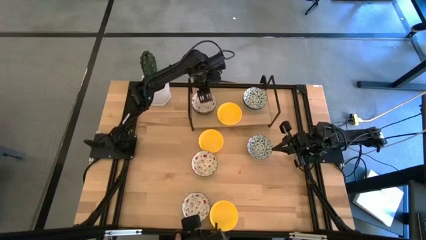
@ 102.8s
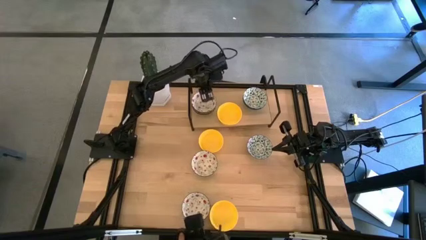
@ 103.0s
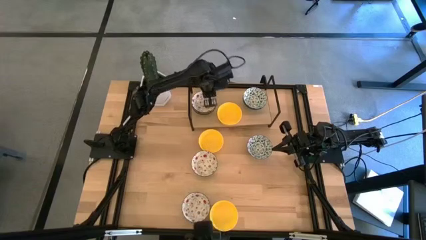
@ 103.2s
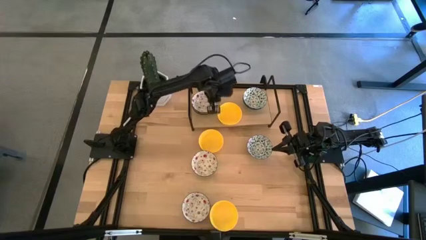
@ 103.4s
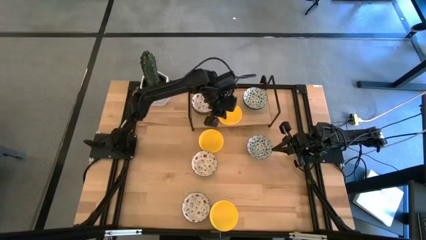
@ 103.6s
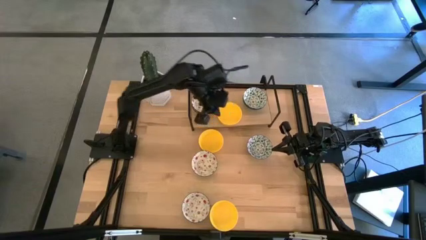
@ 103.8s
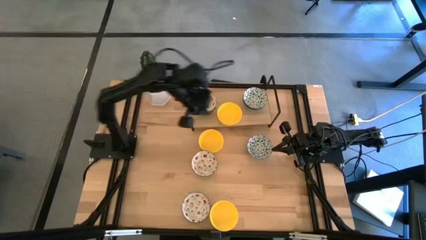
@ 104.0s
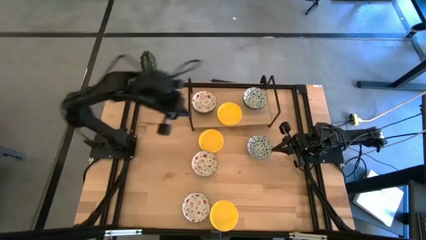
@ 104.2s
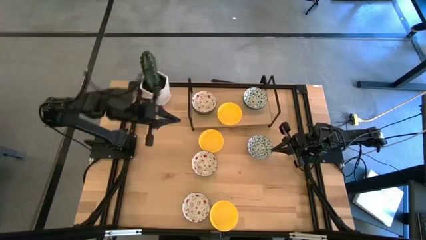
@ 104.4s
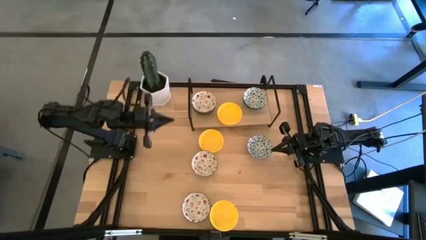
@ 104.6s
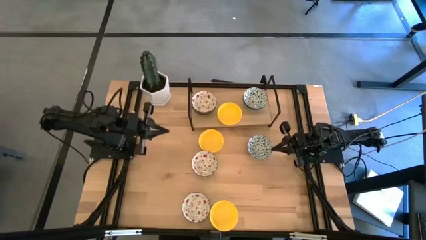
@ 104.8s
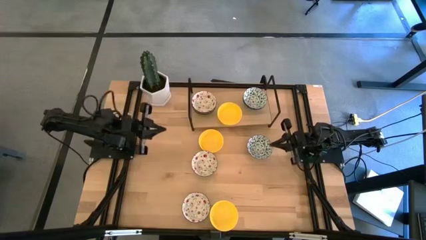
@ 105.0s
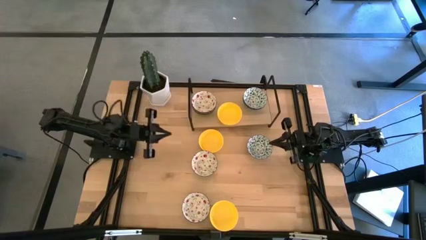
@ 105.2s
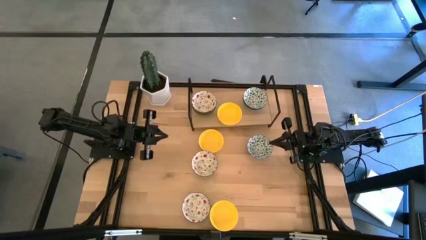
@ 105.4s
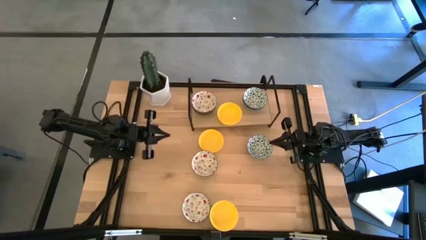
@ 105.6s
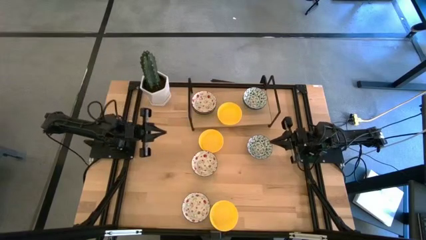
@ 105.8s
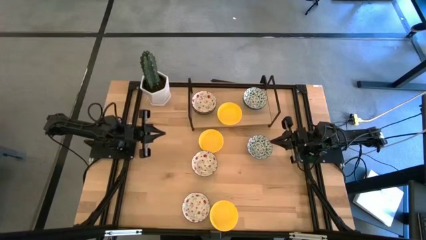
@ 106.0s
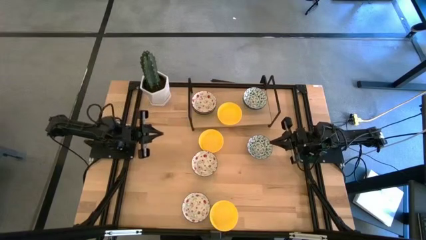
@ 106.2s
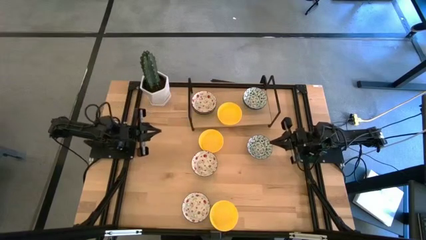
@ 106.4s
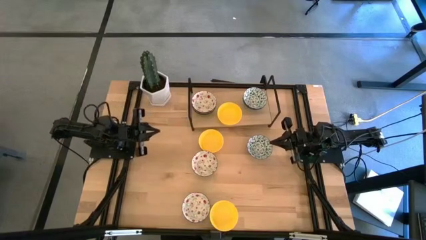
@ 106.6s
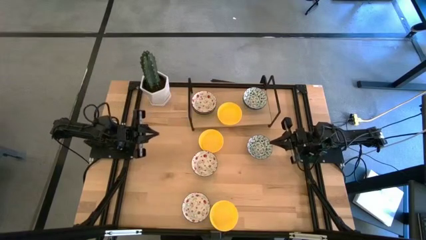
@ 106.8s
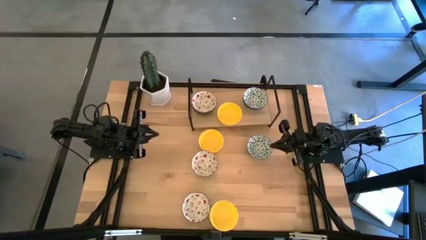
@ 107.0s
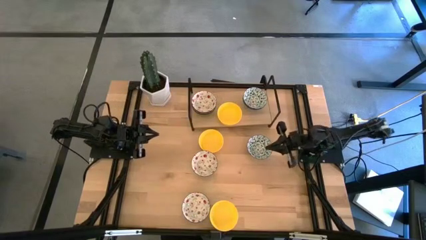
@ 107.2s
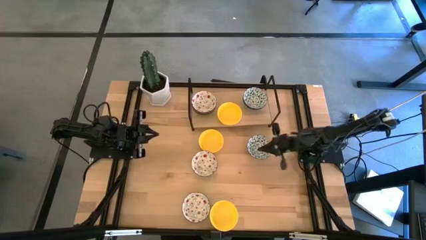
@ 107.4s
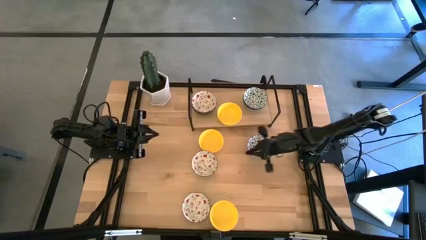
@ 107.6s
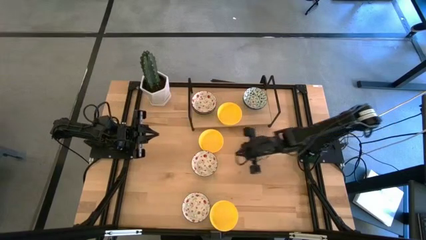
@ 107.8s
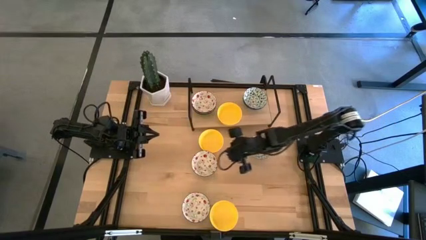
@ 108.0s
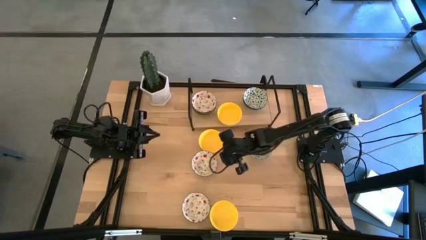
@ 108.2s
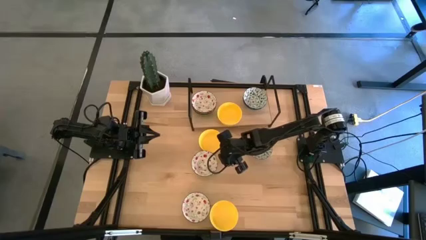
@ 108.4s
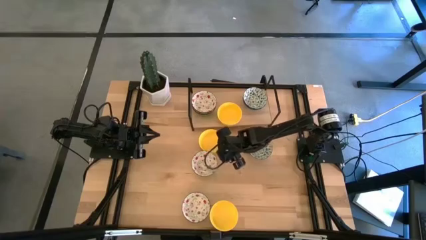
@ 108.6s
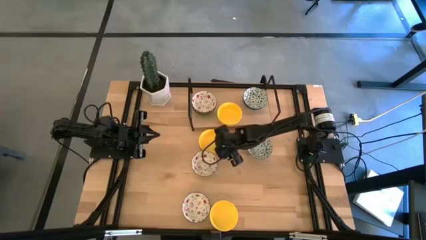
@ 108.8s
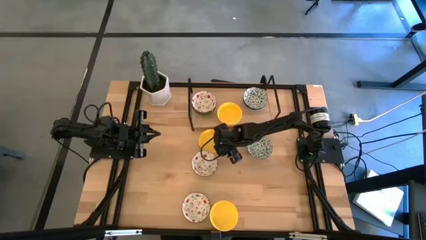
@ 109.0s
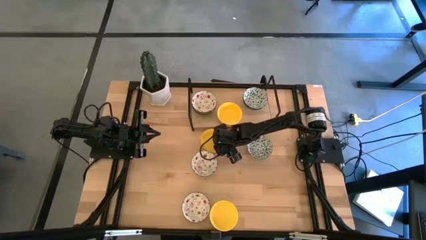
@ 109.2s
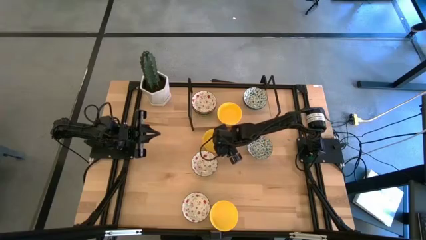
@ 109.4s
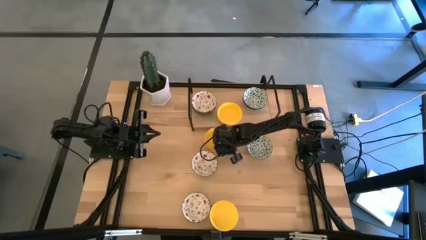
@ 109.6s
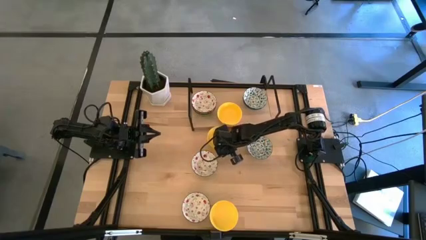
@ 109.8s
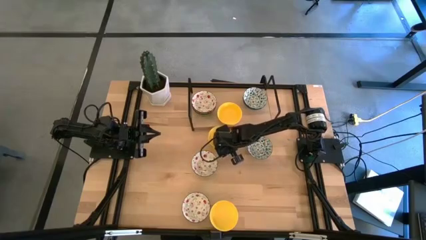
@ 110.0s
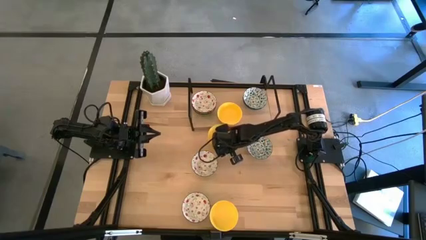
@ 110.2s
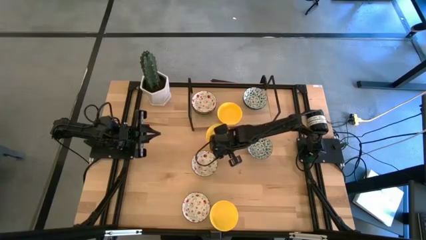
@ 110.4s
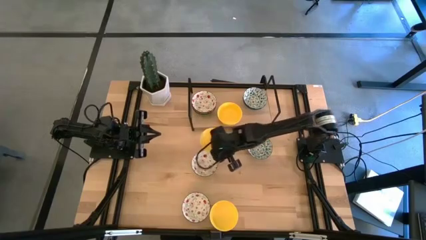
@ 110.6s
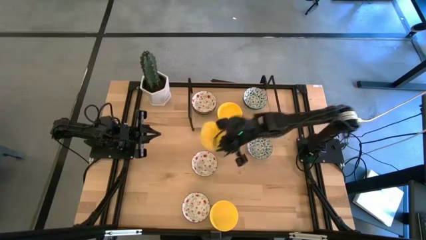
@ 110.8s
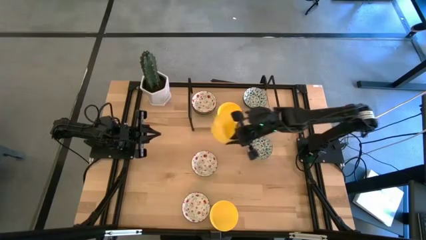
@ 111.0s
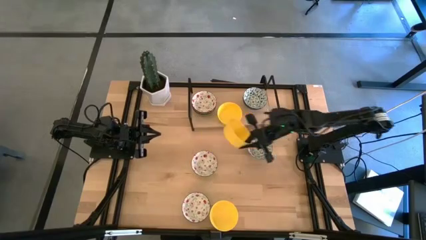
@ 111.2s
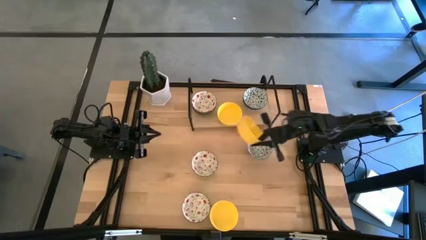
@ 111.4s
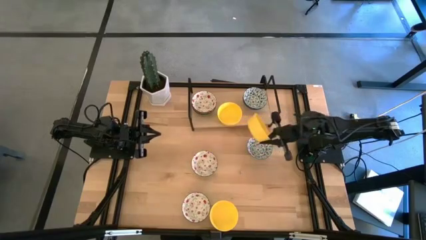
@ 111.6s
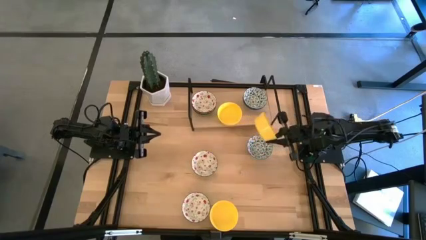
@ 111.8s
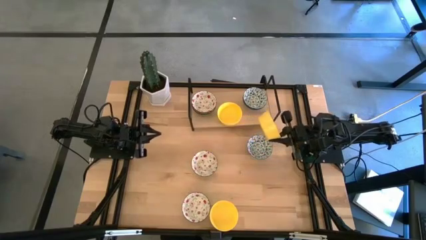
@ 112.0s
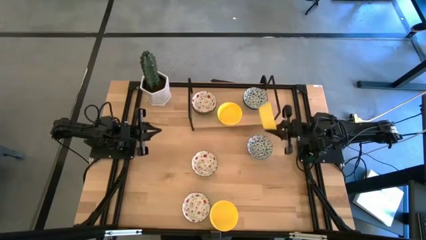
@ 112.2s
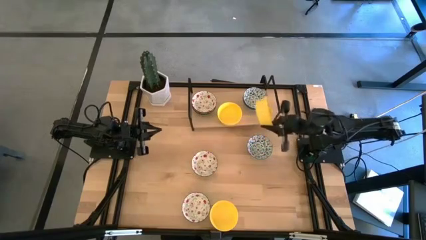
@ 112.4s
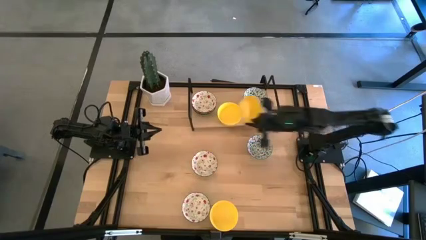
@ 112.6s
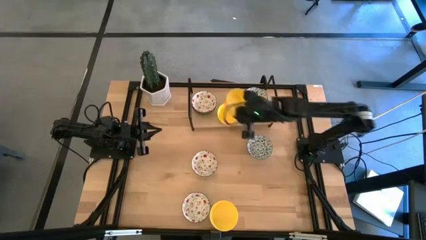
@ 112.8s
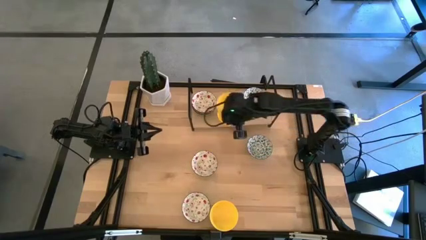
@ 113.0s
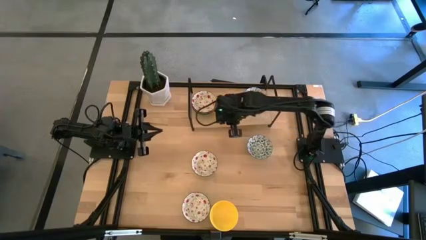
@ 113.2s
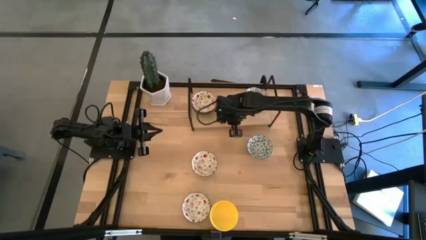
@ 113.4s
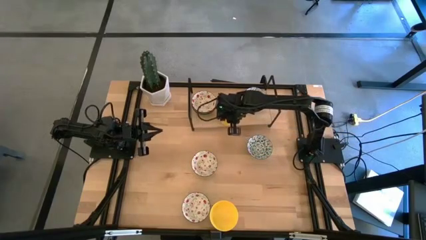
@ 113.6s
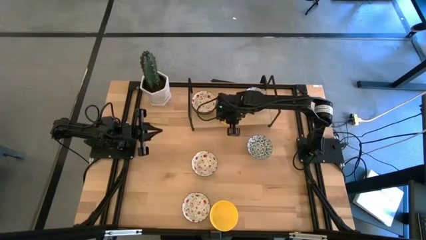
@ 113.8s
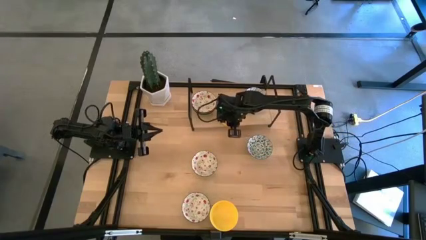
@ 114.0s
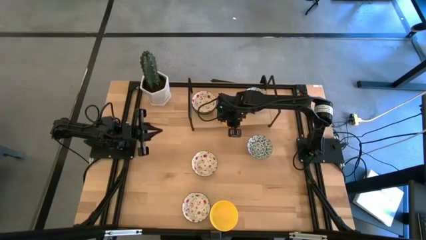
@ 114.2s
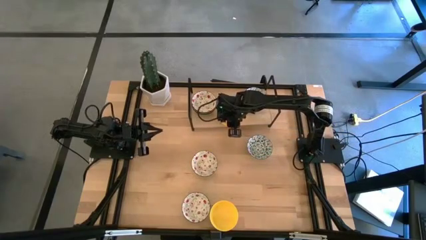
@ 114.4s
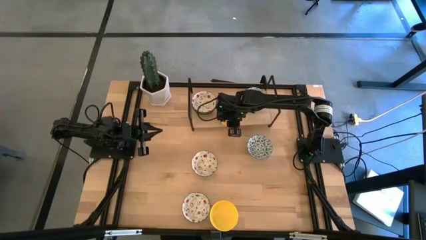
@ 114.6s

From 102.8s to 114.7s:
Task: Pick & Place Mini bowls
Stack the yellow bowl on the yellow bowl on the shelf
